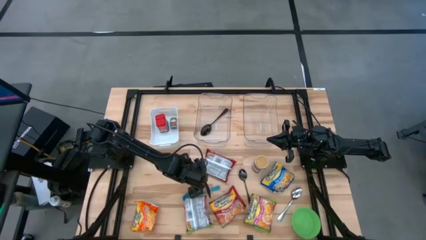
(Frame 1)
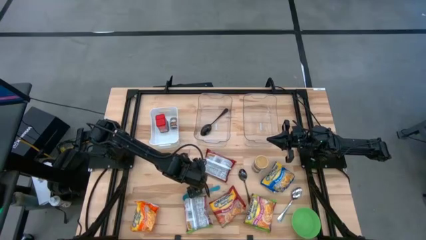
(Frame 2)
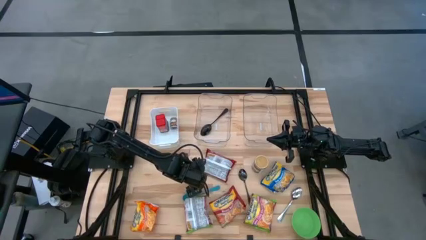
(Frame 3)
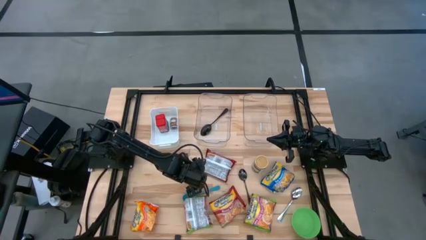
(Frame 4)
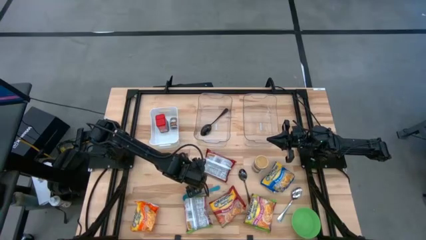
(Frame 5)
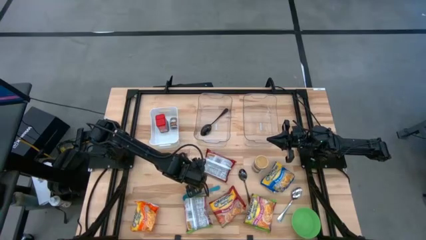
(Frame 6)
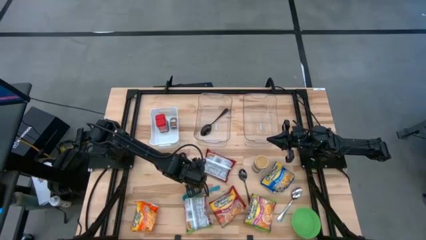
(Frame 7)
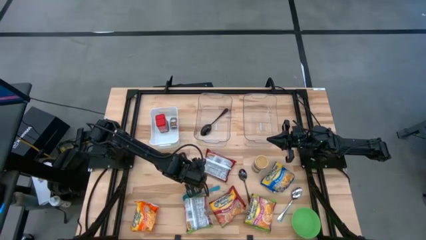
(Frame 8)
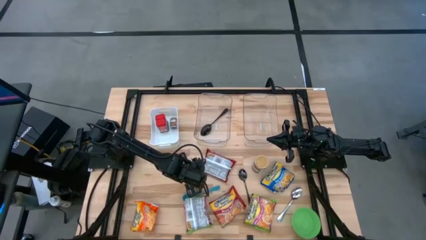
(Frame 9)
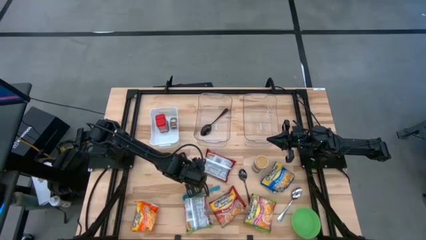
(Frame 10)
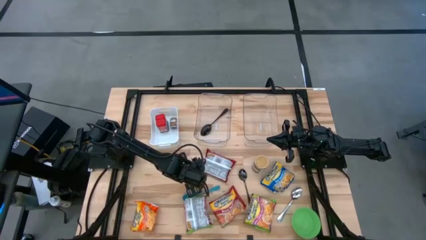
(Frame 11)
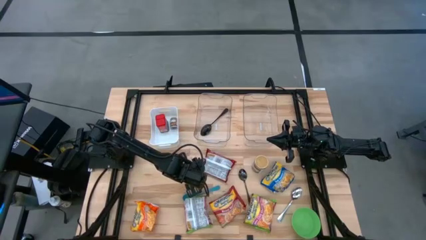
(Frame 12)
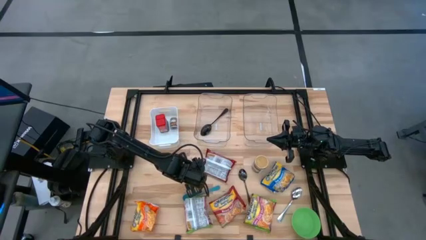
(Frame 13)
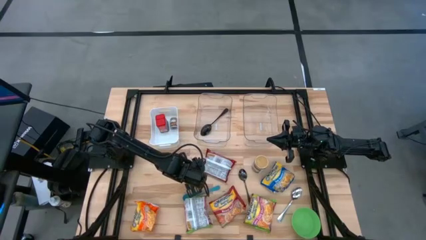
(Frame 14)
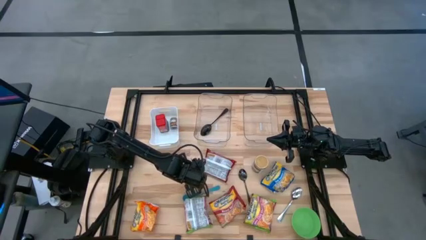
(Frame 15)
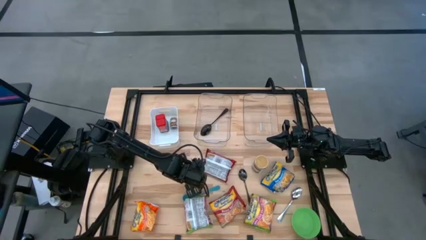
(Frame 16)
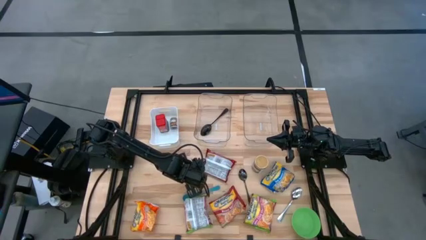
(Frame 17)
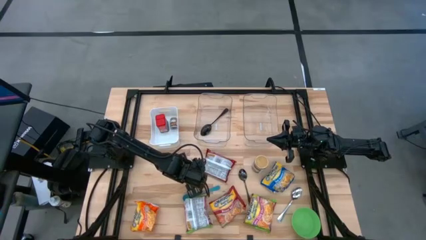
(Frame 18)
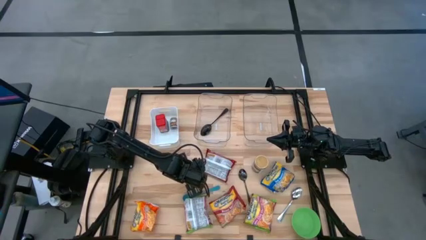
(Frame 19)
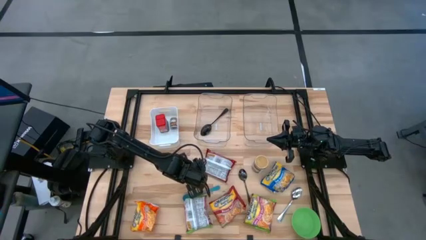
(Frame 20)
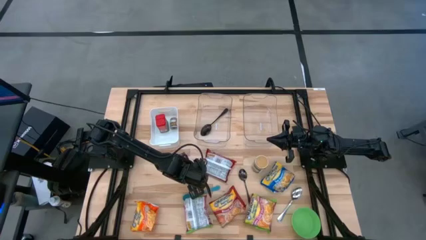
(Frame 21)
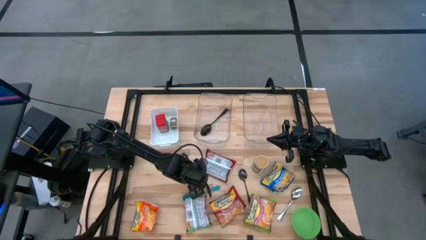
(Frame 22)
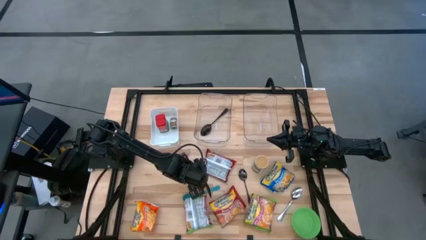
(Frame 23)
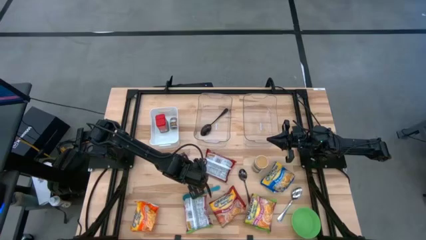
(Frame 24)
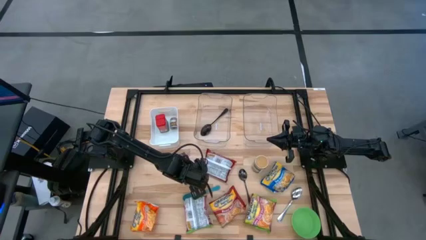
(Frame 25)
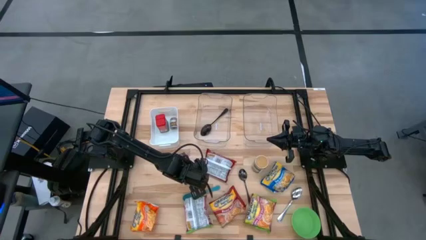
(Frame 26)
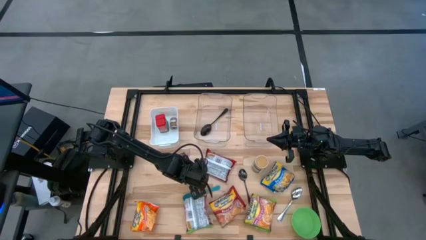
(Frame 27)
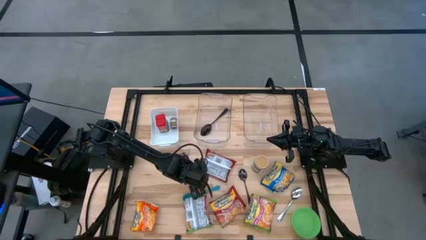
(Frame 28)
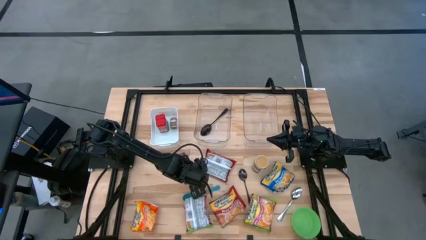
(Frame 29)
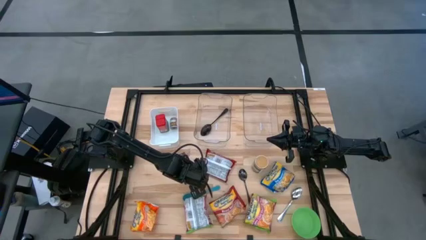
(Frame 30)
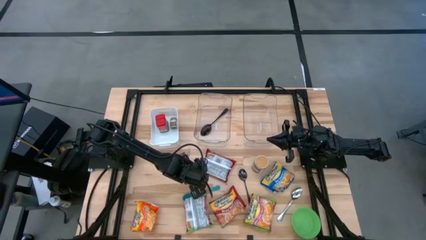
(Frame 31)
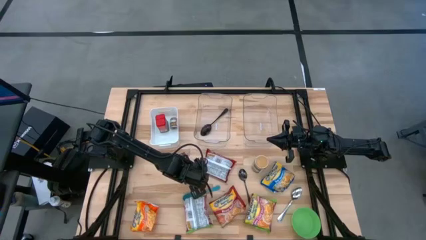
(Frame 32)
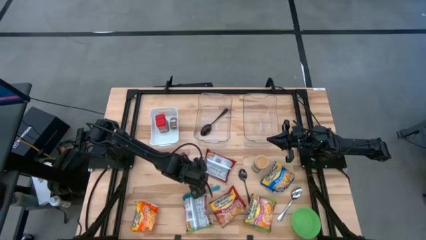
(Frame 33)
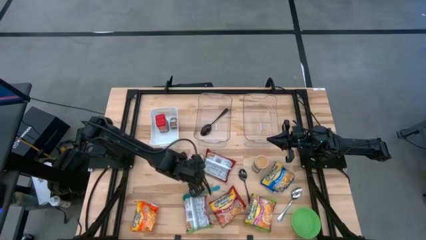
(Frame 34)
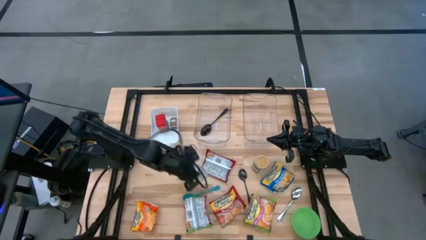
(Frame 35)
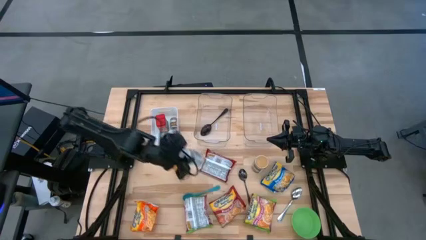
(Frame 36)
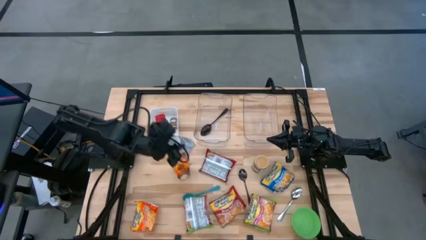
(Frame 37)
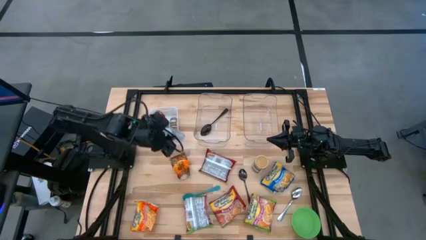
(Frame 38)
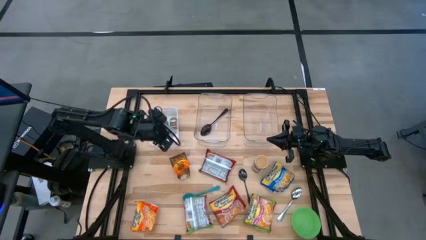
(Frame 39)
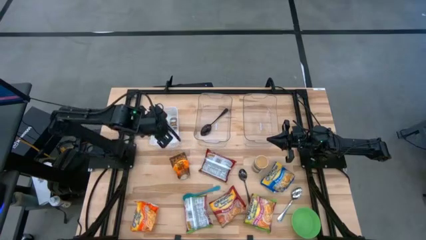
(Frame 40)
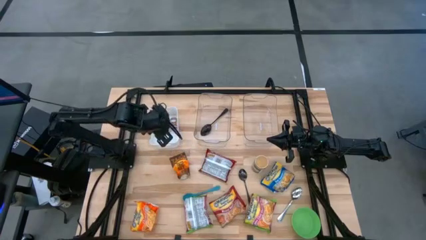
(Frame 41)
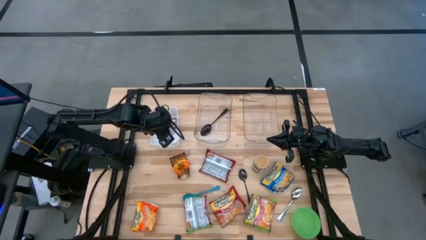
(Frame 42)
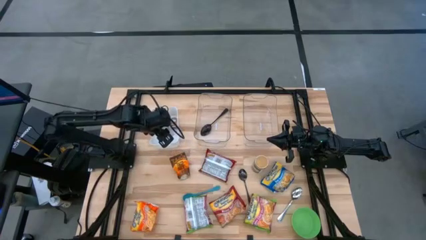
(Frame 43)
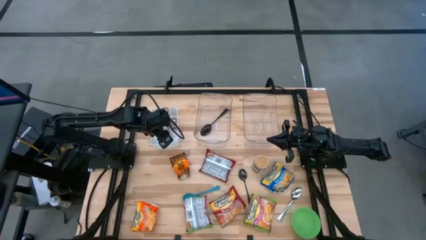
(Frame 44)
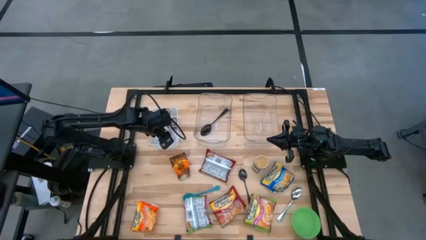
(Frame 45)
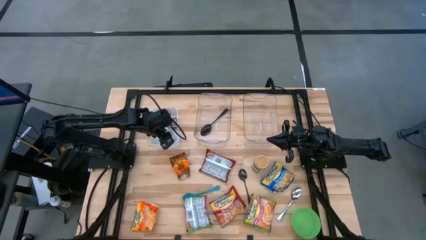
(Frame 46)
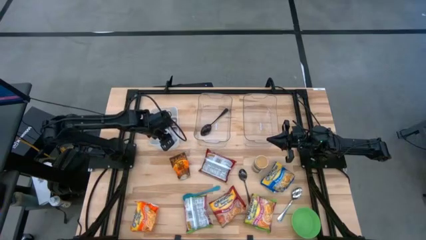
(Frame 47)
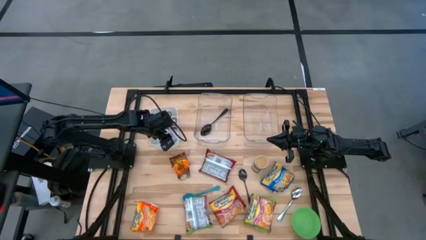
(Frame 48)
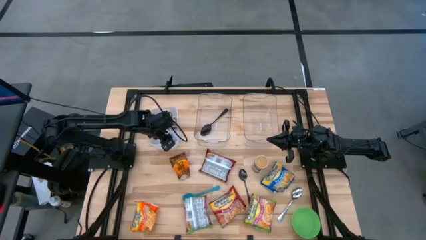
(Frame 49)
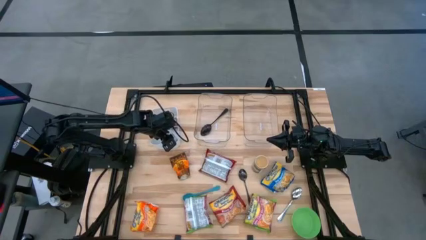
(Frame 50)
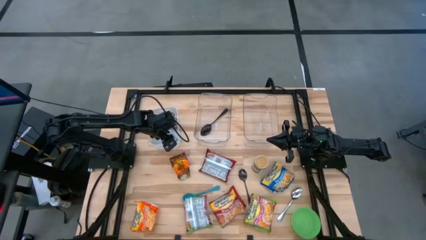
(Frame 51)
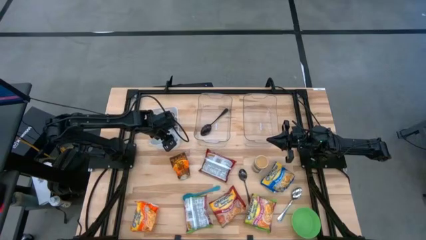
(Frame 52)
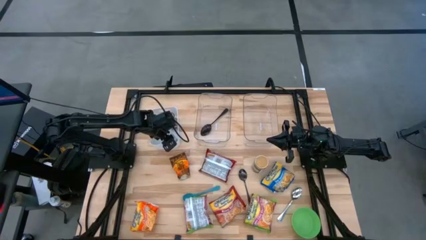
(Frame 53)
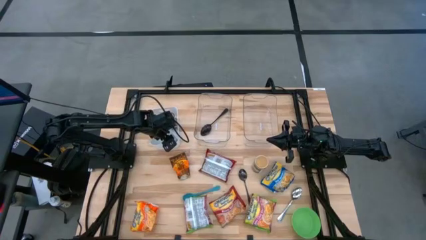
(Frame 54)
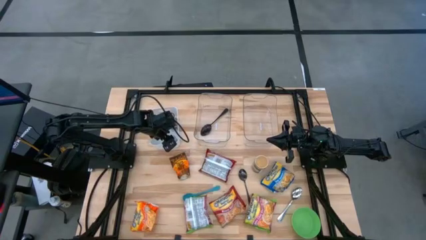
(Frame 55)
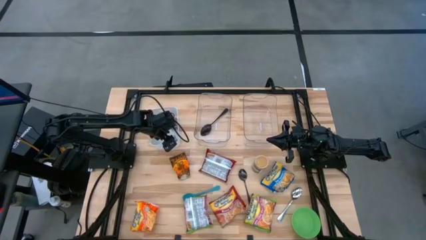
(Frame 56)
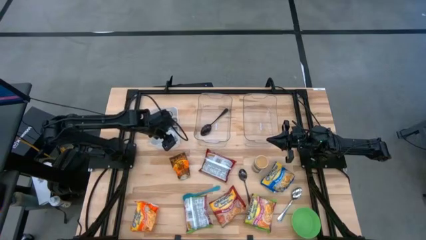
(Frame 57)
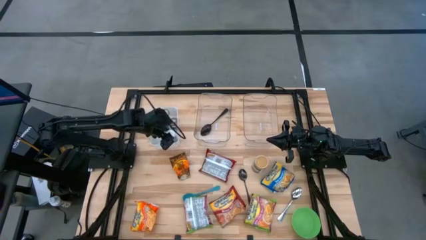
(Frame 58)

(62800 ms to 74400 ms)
Task: Pick & Place Food Item
Put the white seasoning bottle into the white bin
